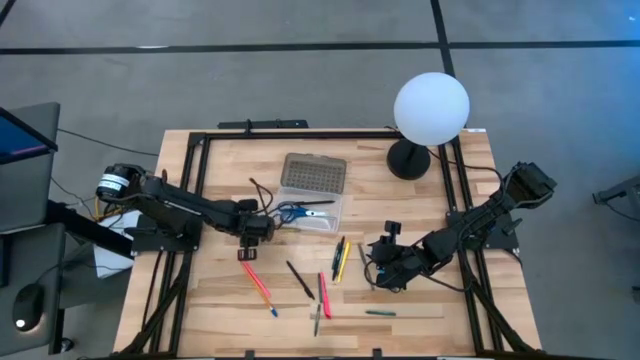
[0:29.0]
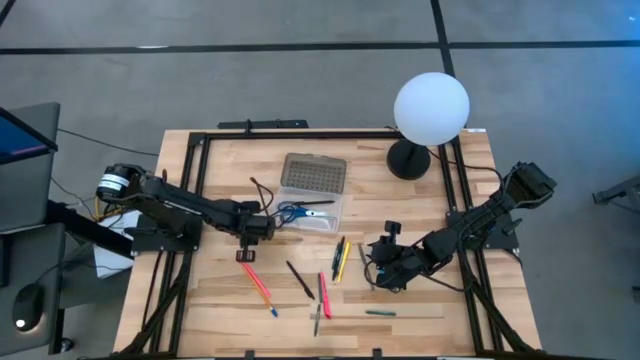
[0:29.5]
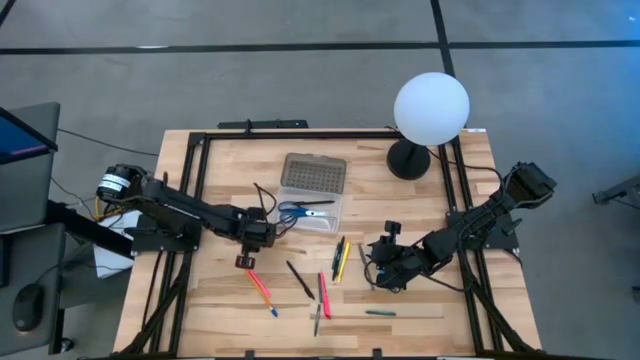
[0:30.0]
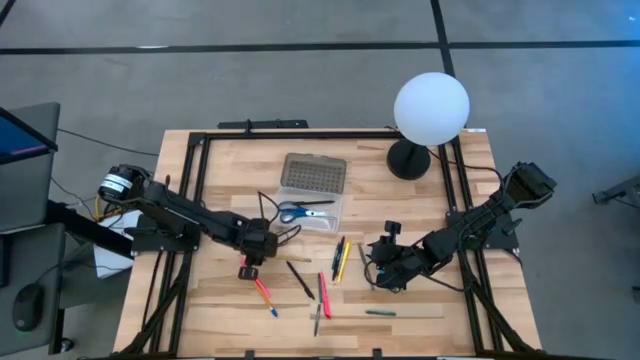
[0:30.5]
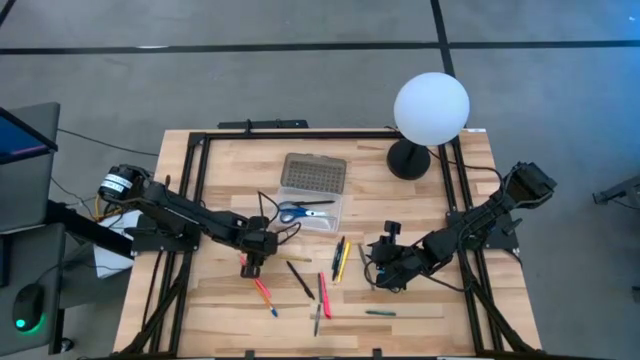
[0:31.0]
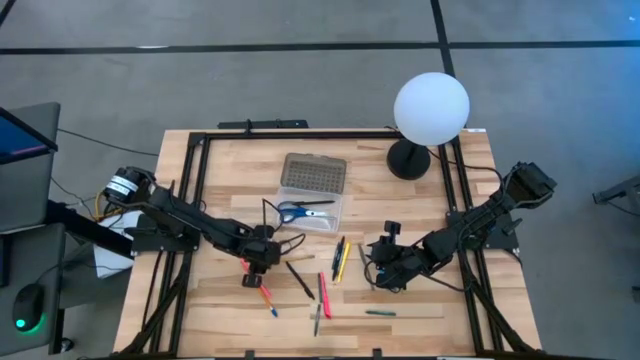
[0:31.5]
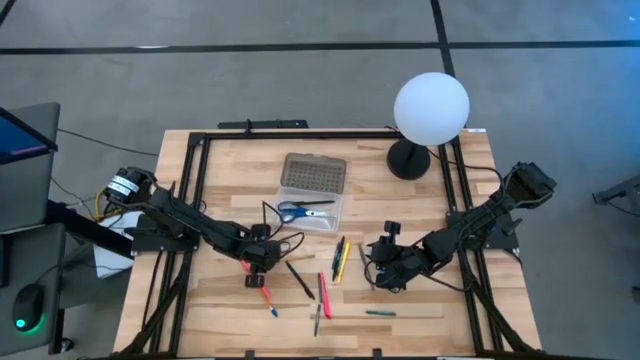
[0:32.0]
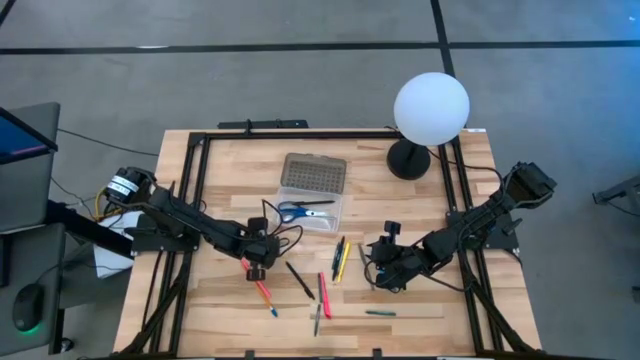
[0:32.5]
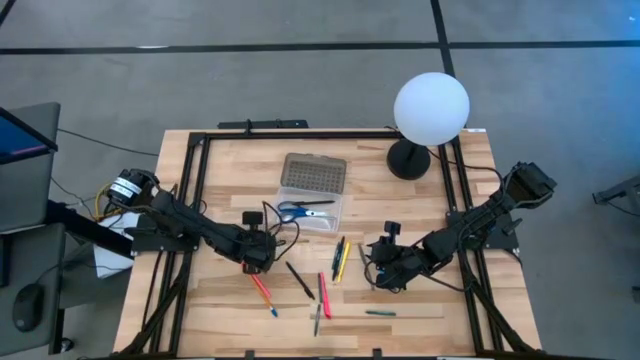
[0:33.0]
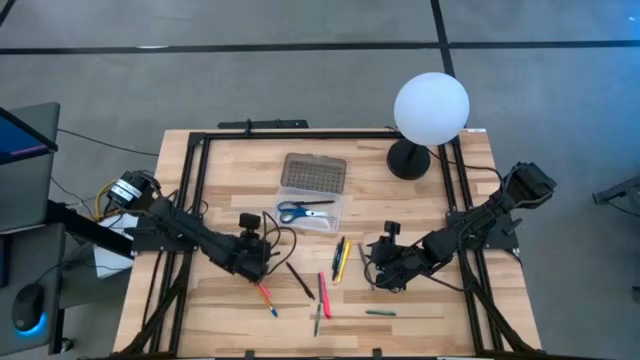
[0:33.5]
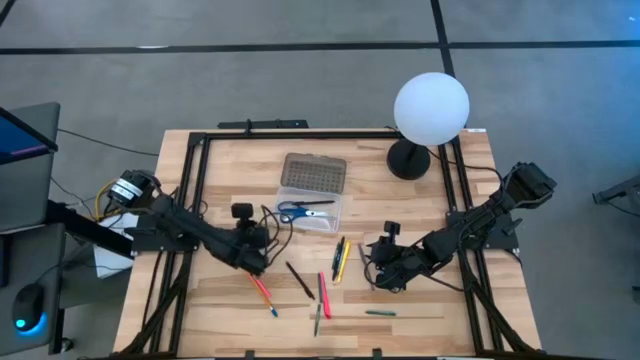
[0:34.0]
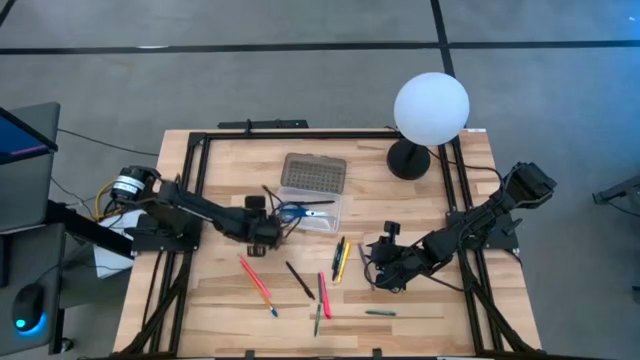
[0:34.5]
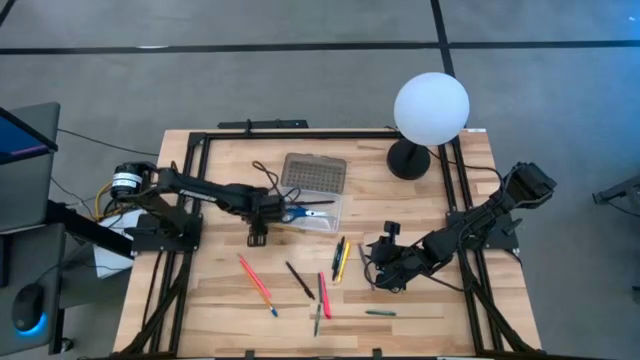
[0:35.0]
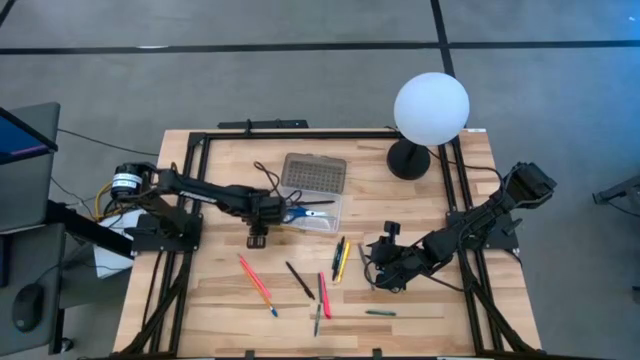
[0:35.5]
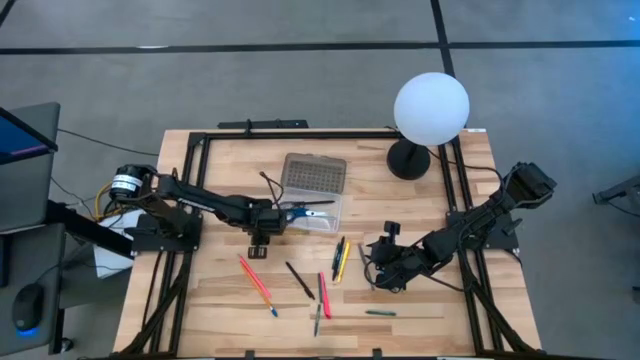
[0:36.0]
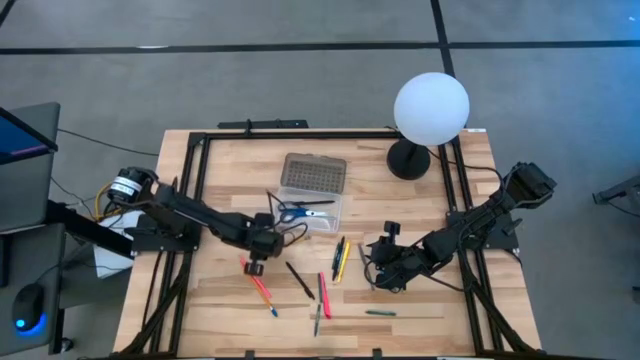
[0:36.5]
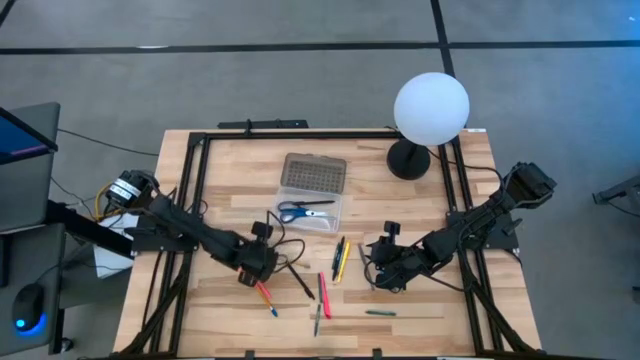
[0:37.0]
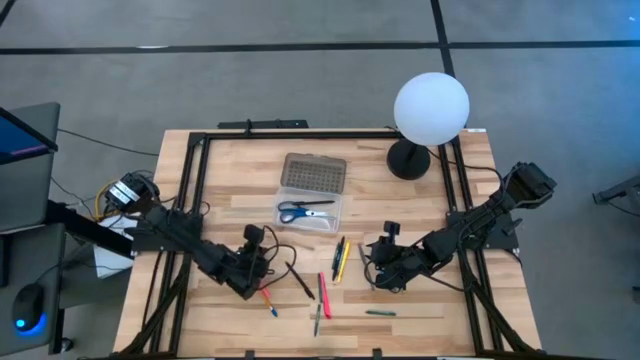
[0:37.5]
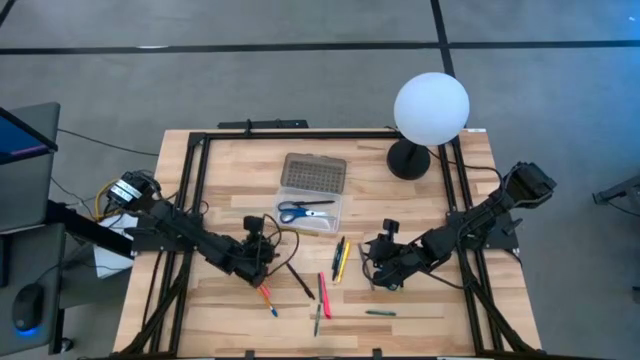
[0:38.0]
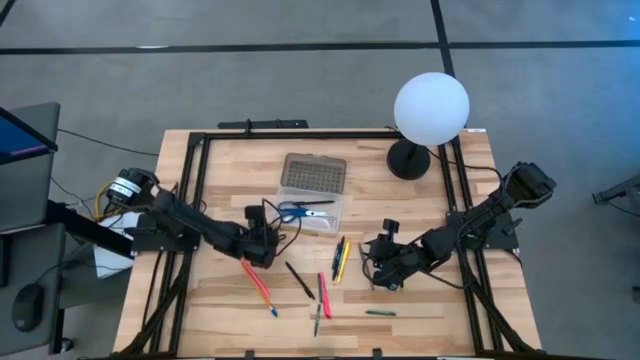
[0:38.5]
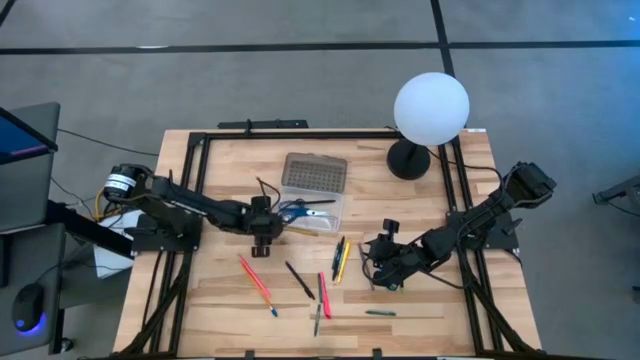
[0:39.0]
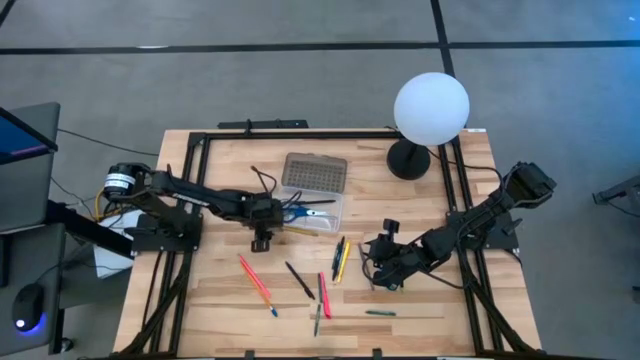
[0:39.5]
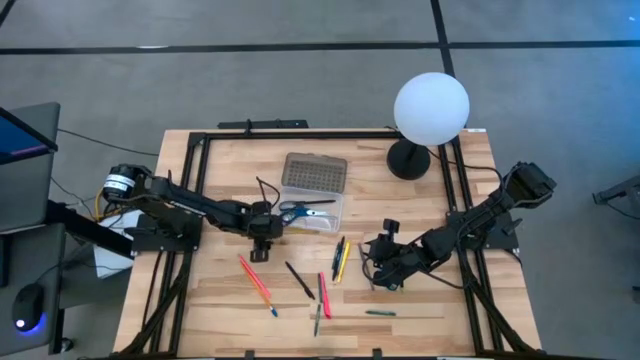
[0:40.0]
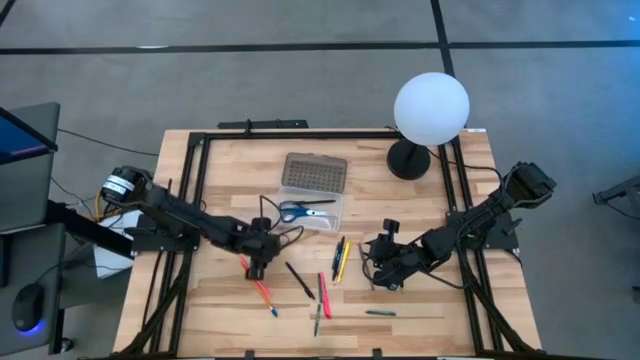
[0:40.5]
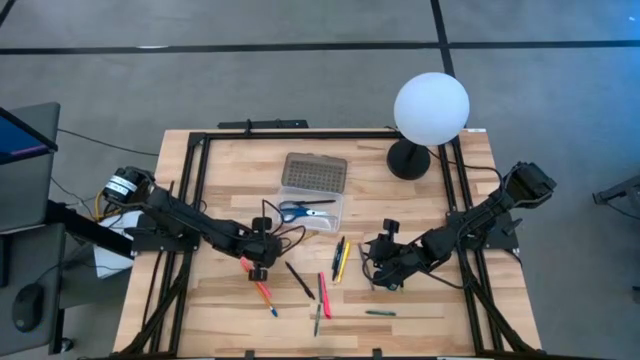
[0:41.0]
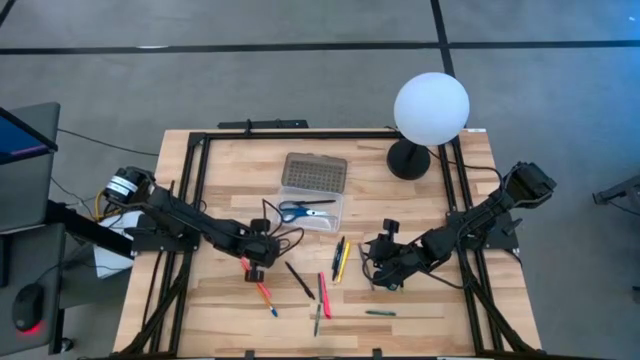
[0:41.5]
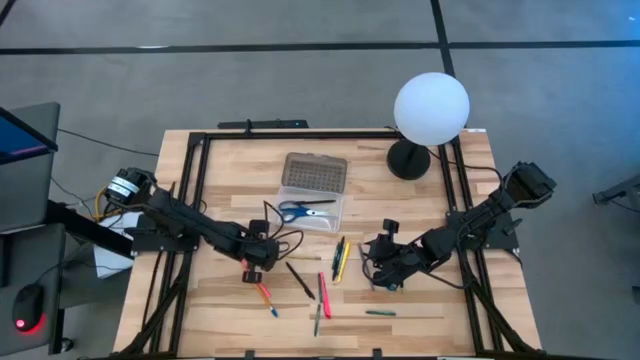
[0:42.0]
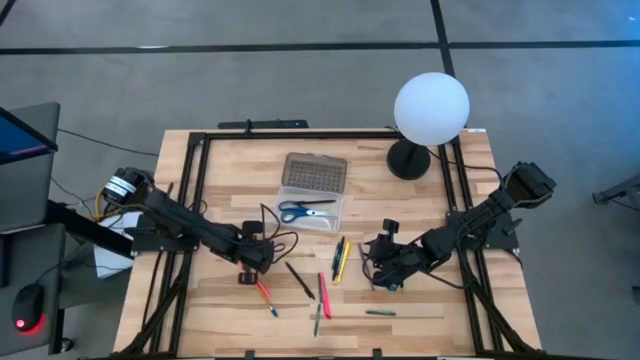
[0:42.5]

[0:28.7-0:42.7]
Task: Pick & place school supplies into a supply box
Put the yellow pencil into the gray supply box

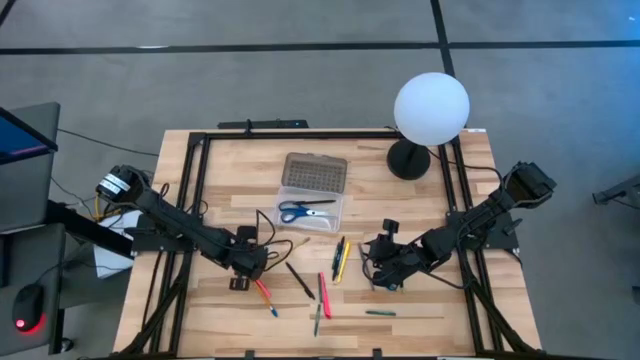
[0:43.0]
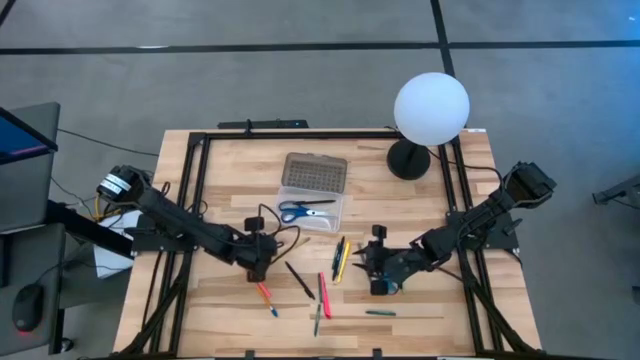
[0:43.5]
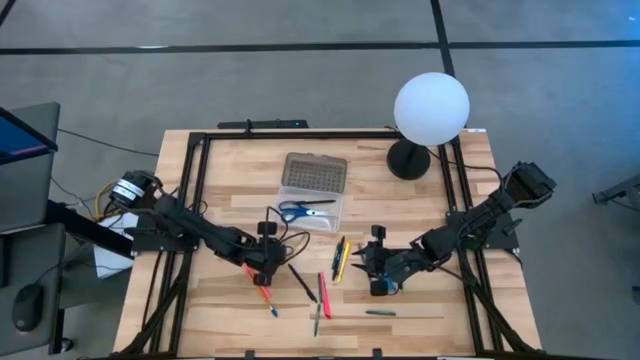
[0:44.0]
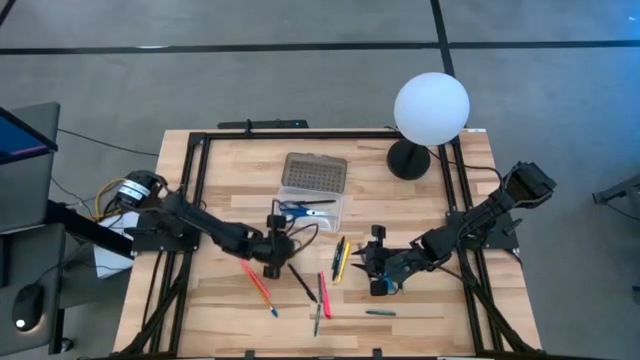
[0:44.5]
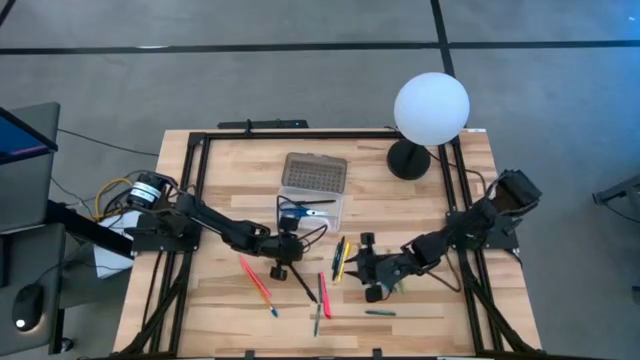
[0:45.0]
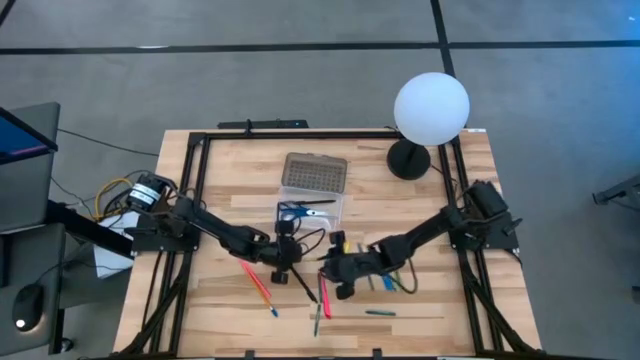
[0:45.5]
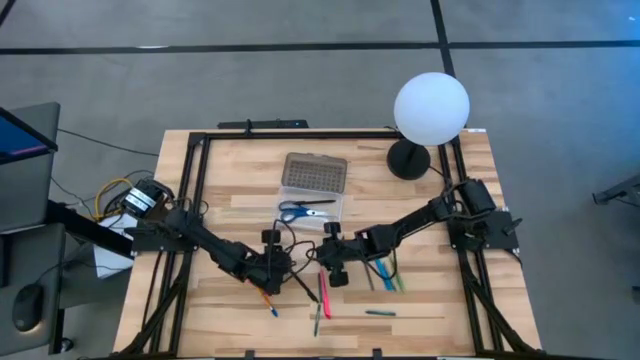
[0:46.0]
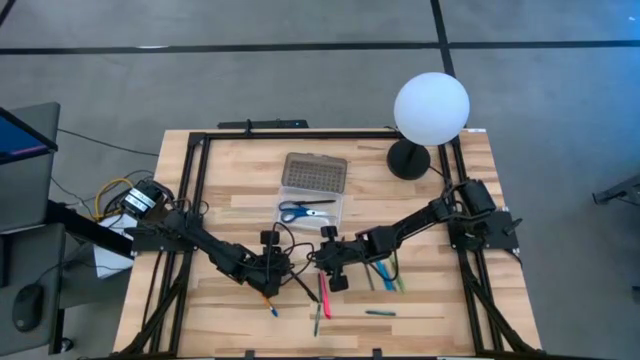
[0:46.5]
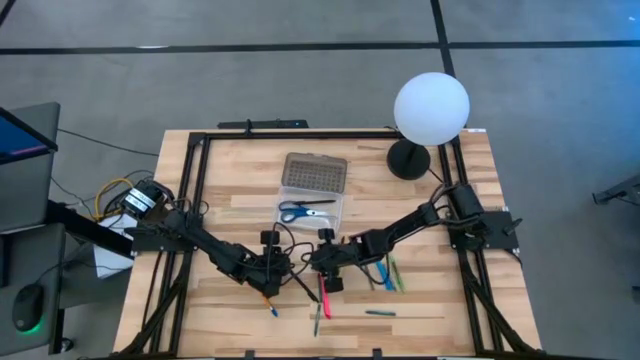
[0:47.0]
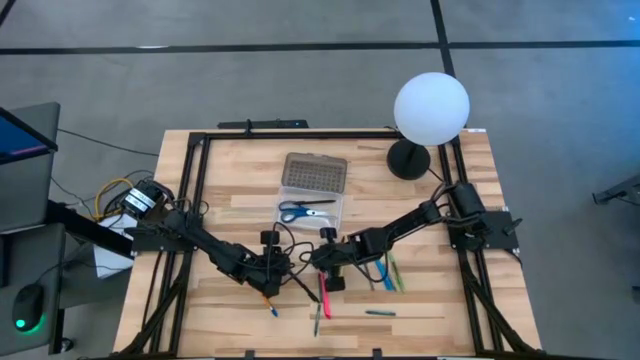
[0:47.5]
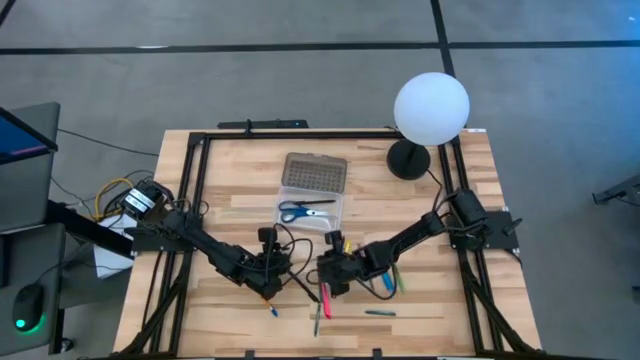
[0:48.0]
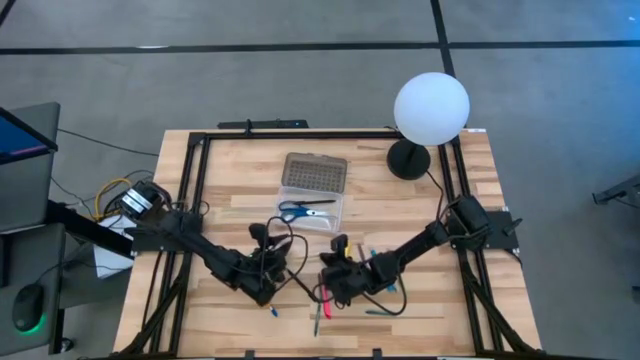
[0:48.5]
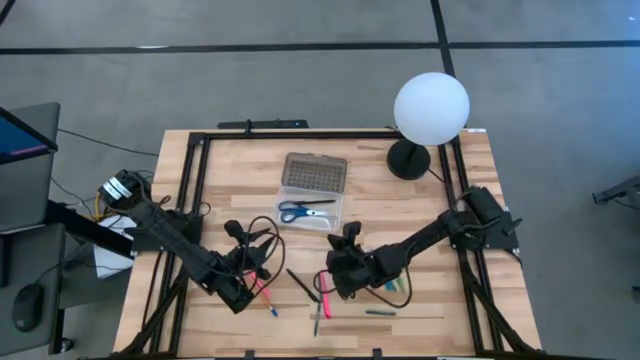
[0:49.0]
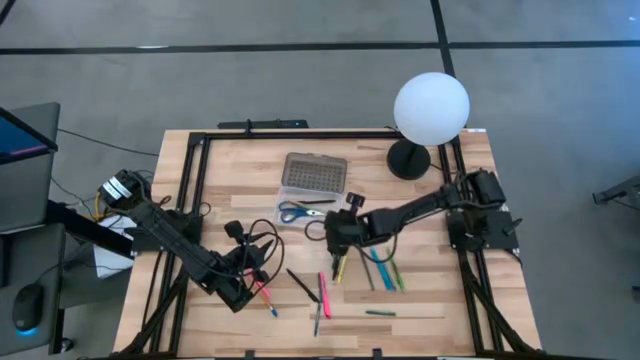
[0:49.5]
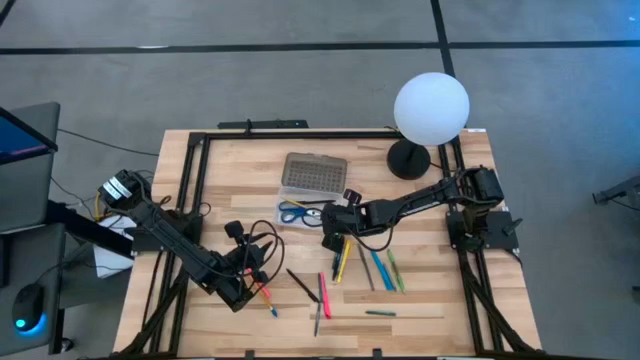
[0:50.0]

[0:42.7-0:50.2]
Put the yellow pencil into the gray supply box
